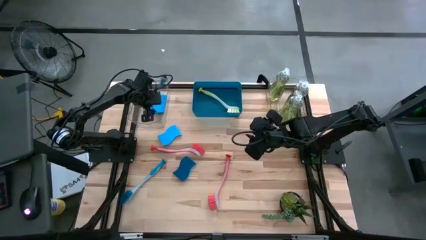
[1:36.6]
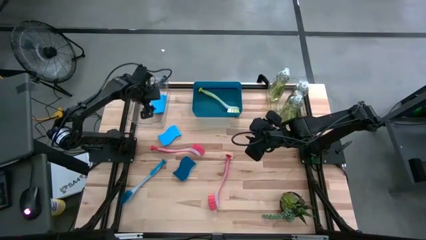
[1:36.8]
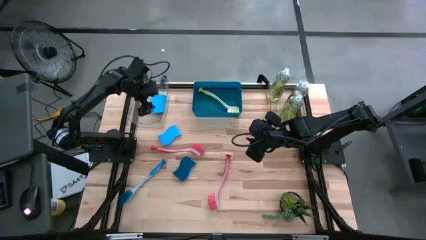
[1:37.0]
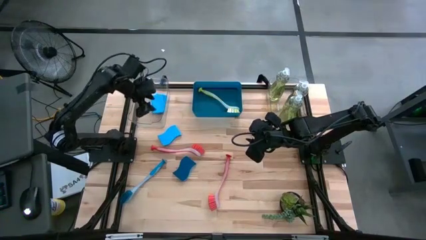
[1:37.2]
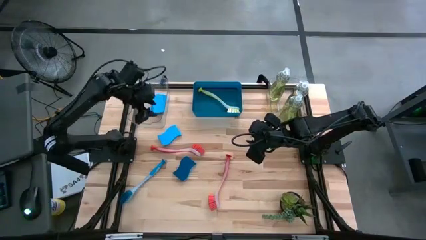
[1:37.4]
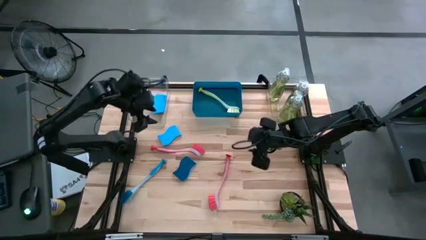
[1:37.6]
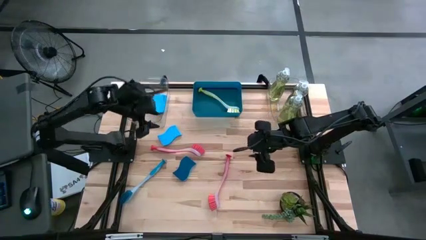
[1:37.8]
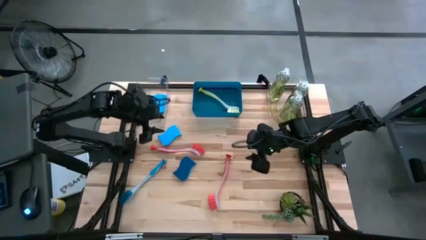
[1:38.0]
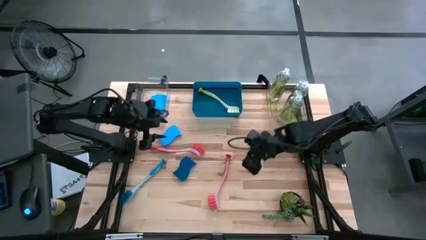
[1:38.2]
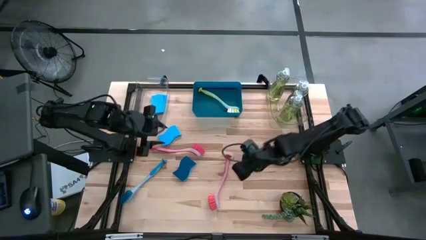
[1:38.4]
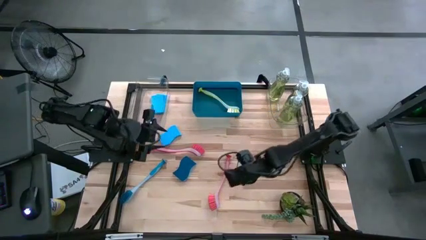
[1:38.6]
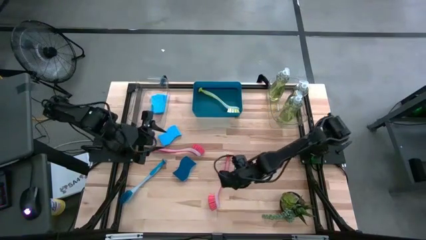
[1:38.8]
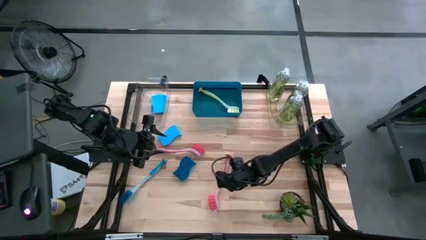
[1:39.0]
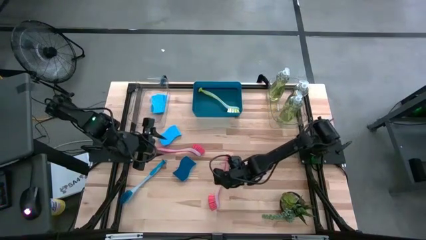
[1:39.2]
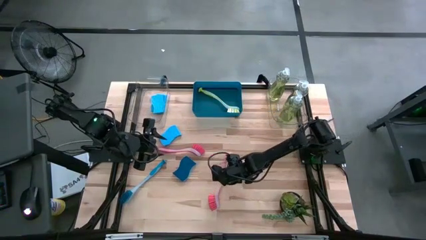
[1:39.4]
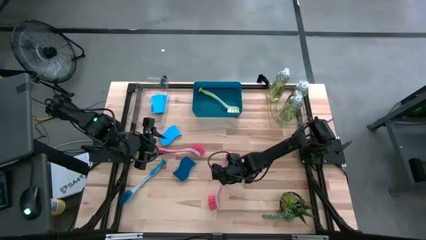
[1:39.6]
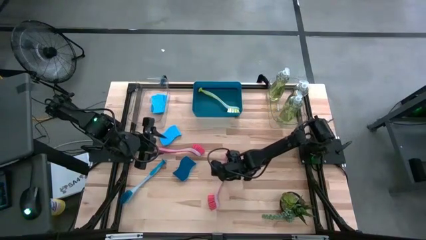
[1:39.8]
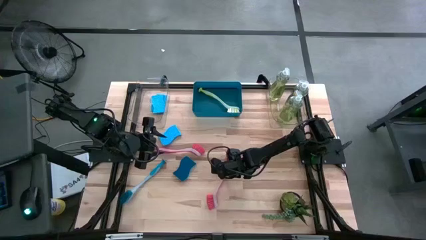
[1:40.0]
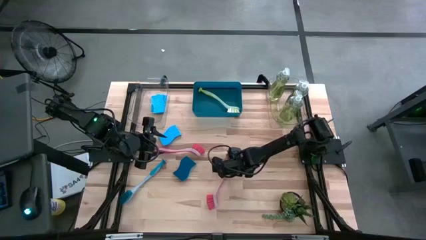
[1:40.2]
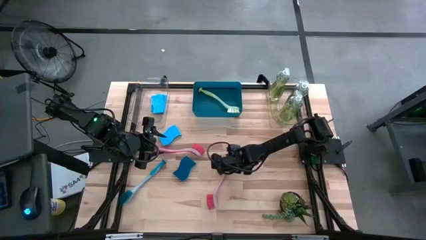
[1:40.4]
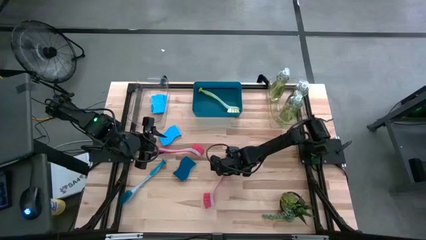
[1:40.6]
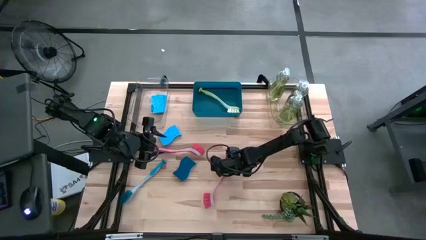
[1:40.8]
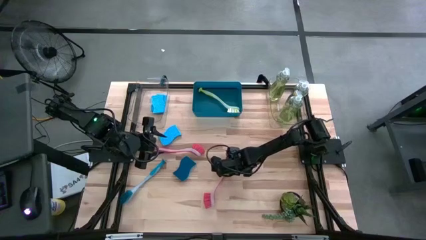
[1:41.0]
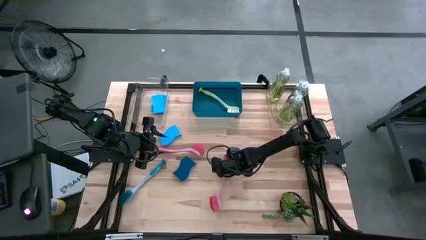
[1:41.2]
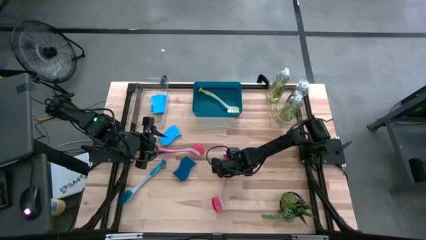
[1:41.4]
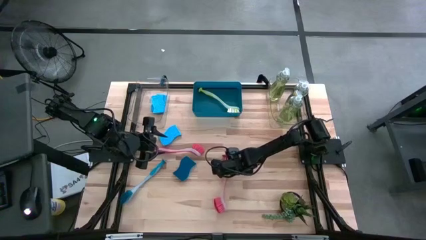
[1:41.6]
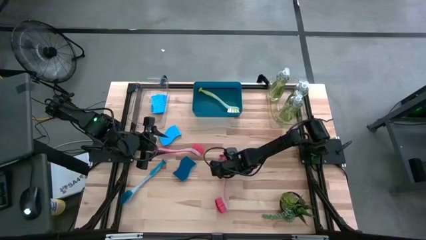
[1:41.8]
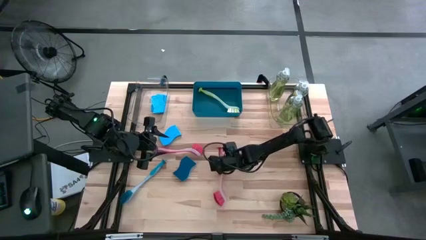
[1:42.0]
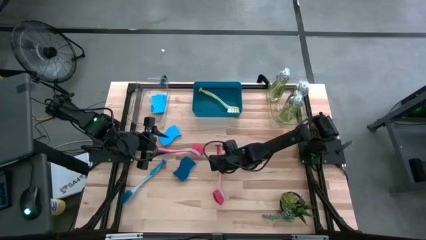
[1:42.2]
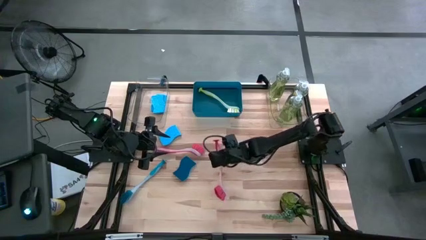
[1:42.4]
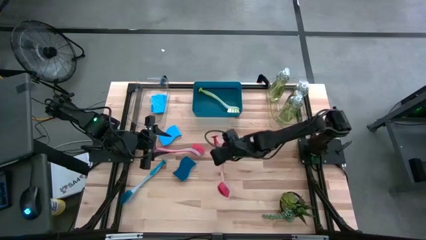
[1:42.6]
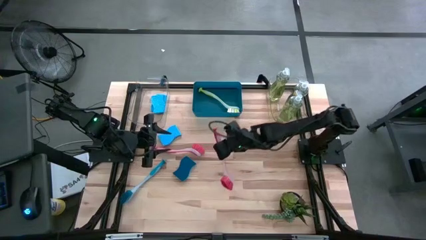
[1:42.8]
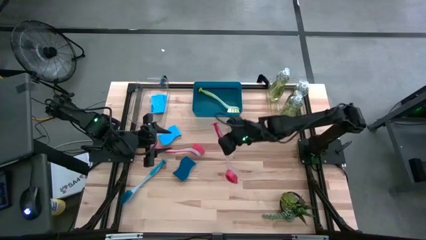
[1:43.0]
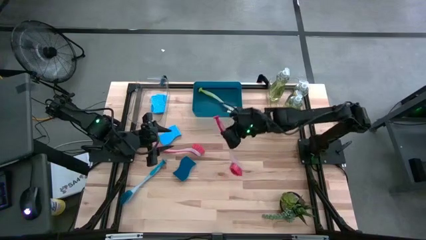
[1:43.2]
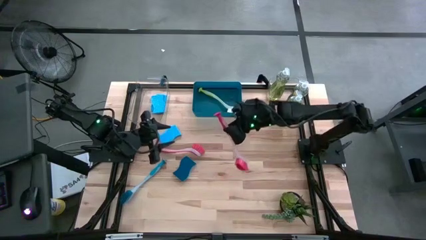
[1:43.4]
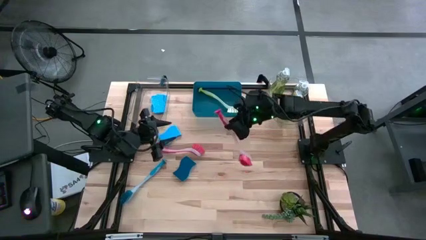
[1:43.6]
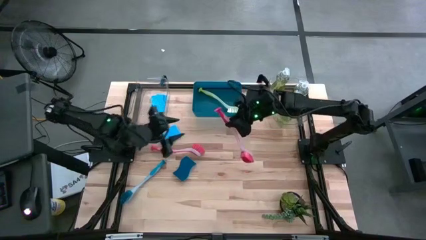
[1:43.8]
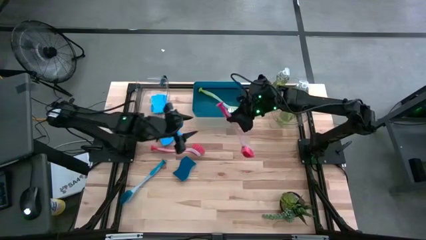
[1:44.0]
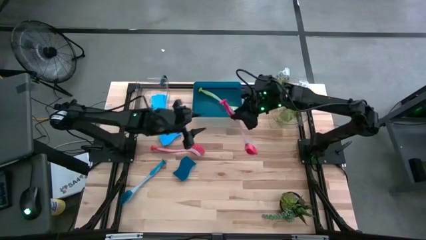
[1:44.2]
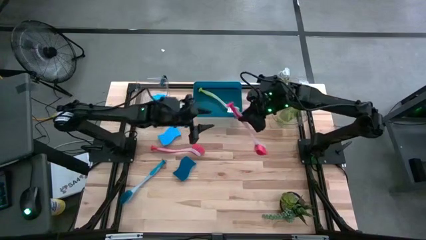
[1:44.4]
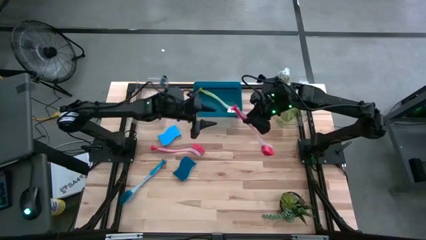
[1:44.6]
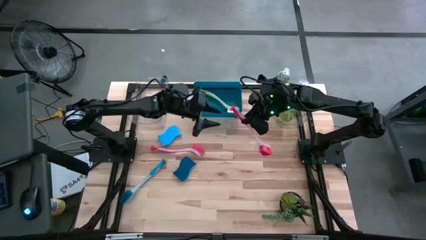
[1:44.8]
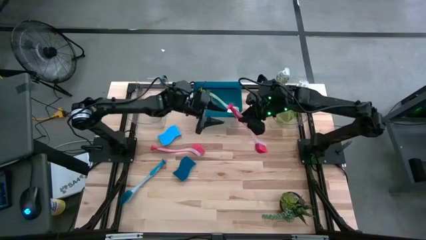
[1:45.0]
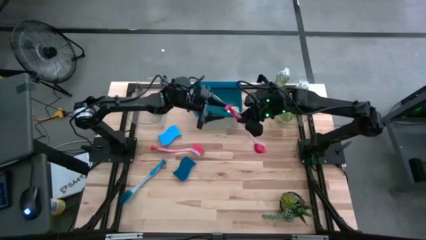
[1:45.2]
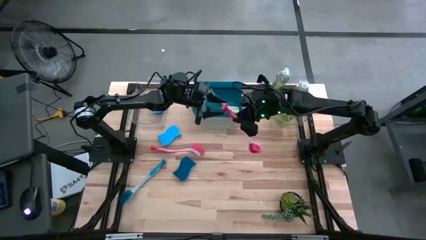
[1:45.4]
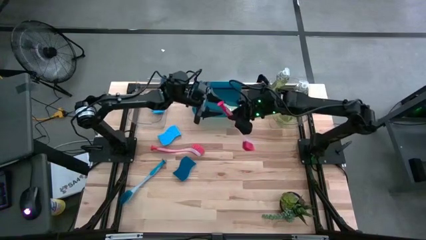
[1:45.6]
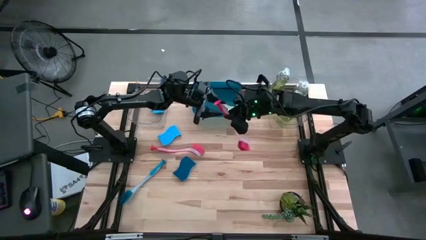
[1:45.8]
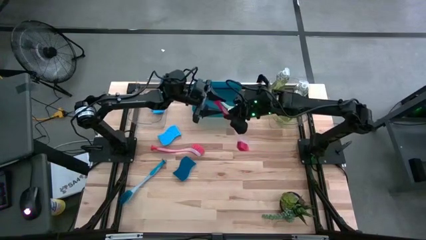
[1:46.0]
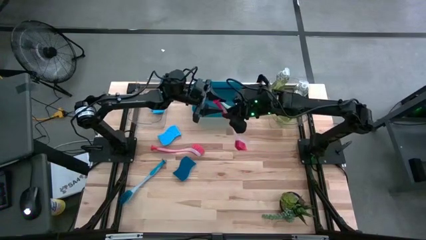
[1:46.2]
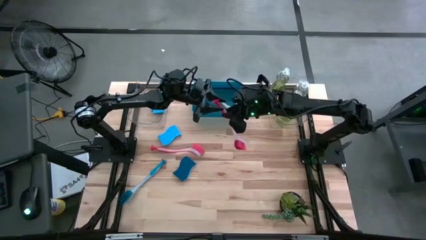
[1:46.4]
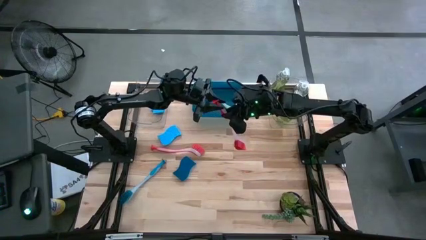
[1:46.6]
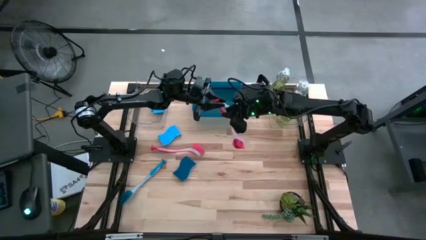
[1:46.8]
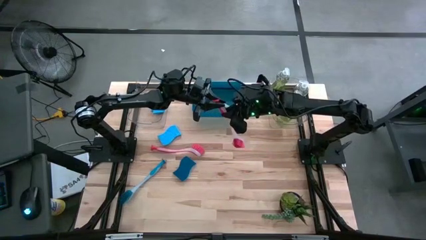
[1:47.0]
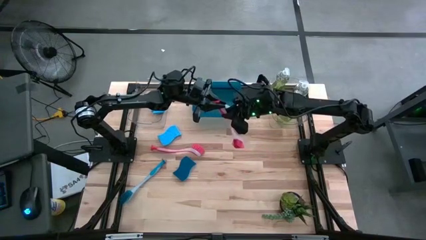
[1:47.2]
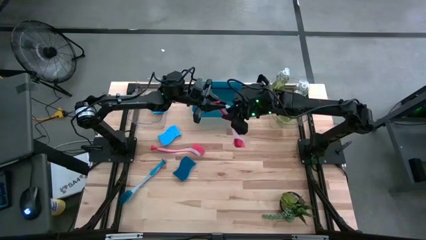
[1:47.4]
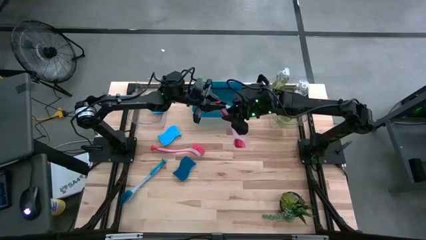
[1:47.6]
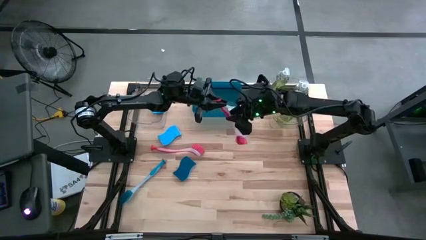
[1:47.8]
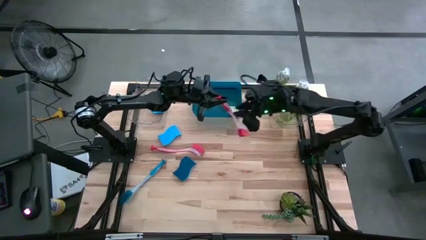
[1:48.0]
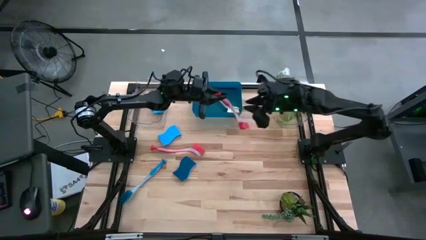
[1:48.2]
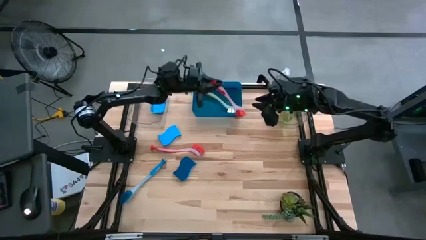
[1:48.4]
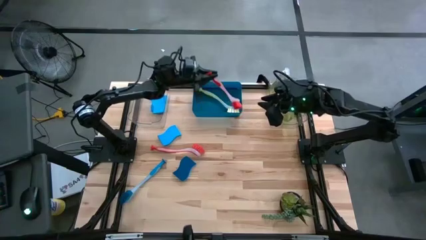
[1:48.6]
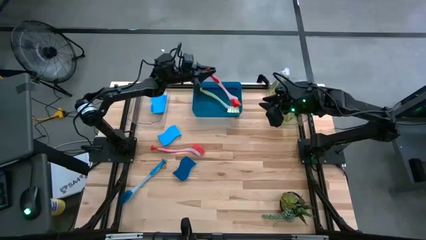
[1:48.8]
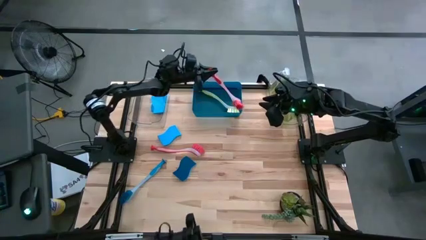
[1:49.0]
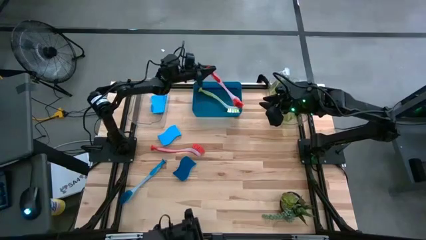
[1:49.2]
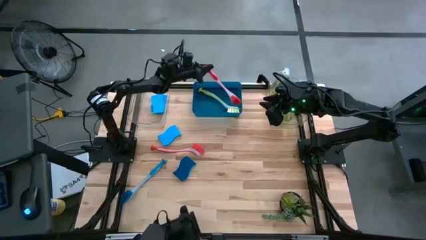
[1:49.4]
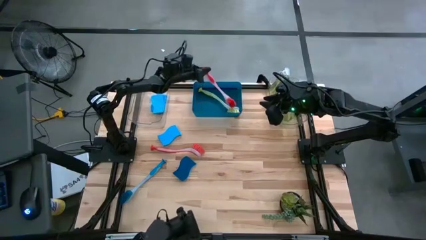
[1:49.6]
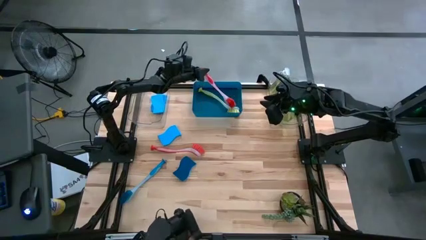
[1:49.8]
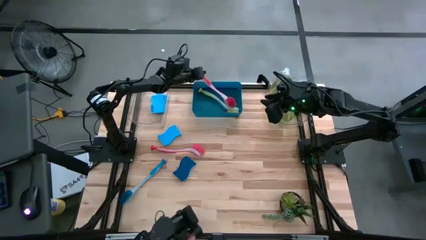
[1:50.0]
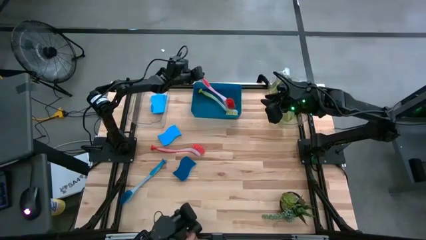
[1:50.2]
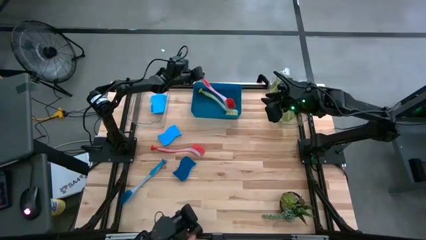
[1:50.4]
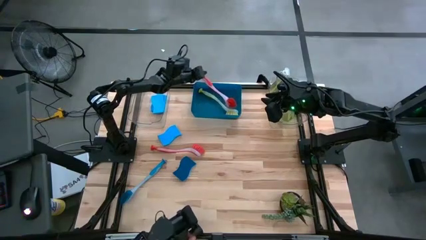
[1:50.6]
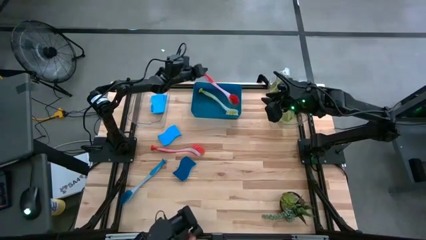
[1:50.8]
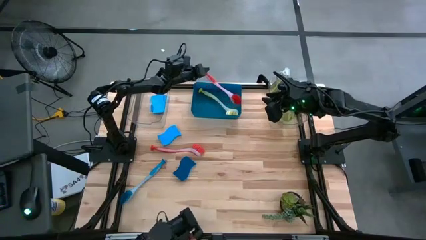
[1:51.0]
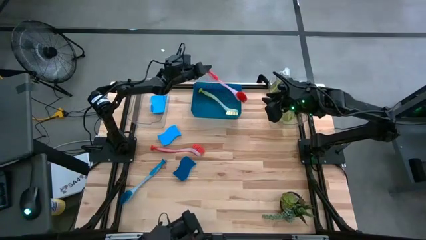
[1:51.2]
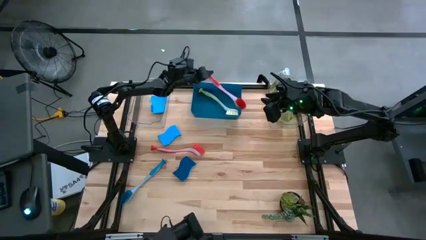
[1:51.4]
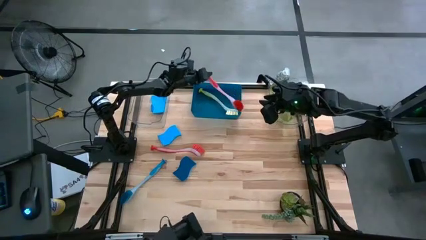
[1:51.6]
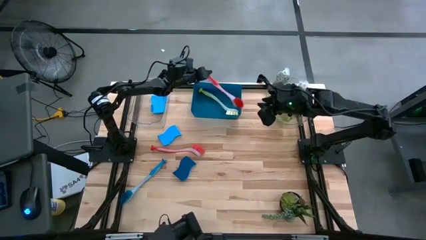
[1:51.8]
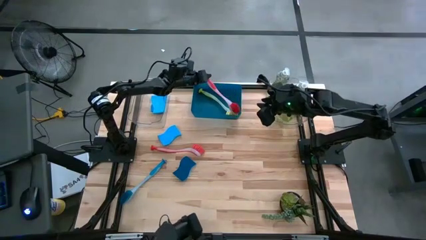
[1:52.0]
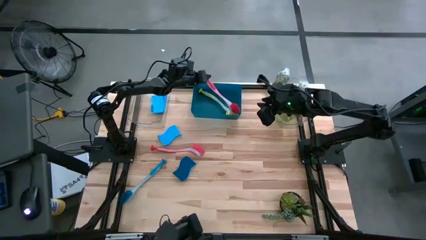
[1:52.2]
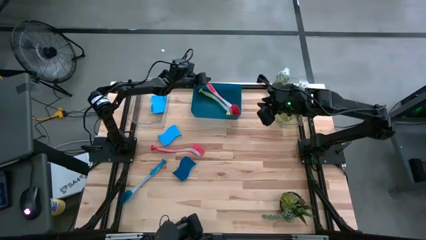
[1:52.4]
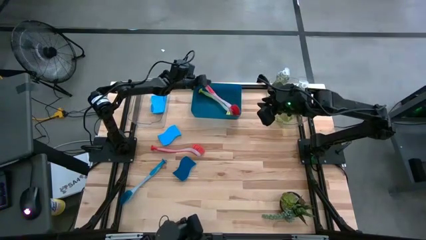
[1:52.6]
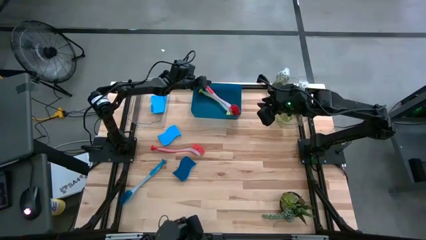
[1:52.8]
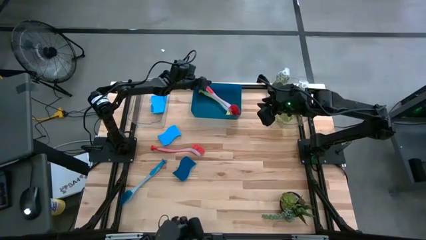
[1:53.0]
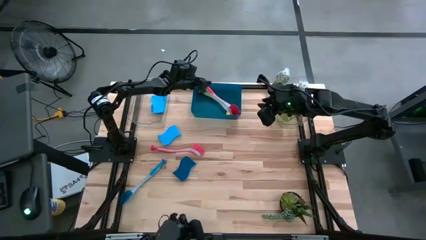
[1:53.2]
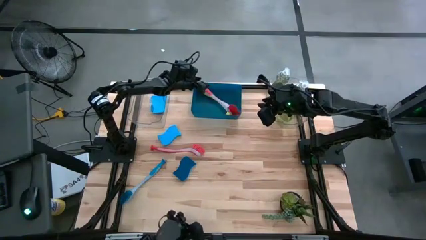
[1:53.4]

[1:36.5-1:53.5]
Task: Pick & Place Kitchen Sink Supplies
Put the right red dish brush into the blue bin
